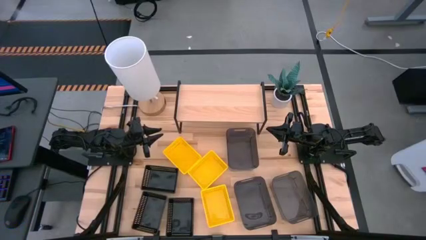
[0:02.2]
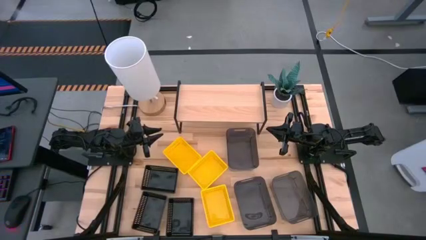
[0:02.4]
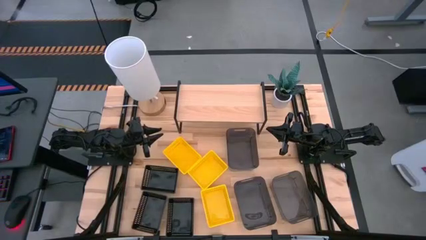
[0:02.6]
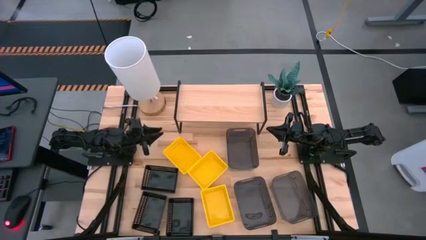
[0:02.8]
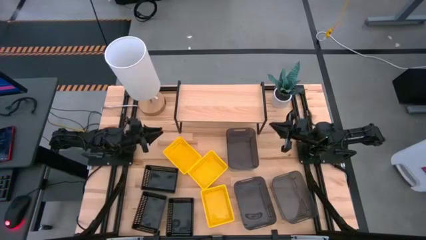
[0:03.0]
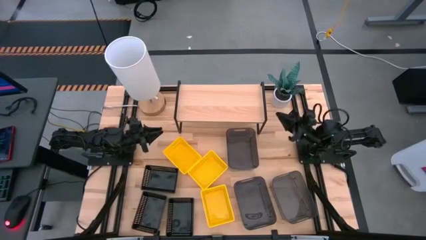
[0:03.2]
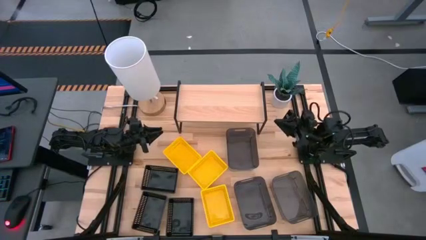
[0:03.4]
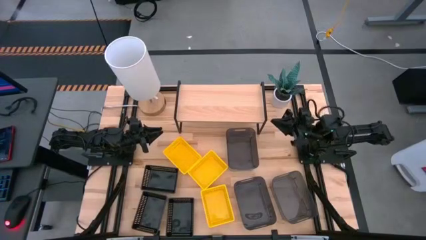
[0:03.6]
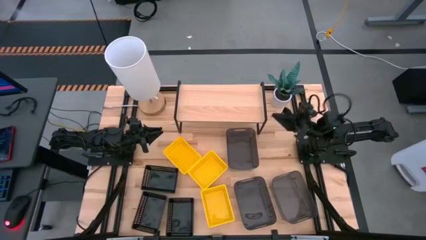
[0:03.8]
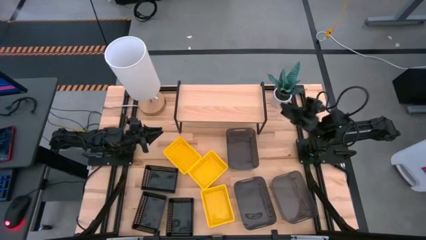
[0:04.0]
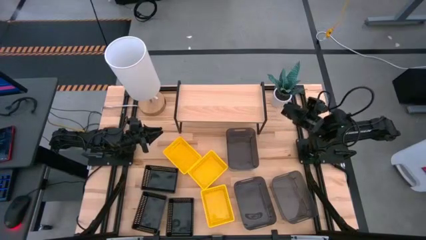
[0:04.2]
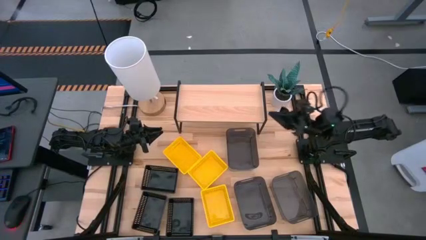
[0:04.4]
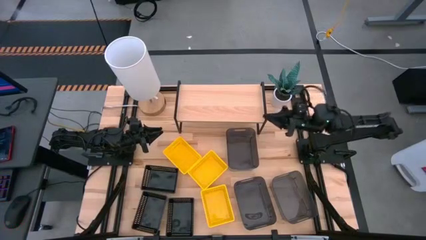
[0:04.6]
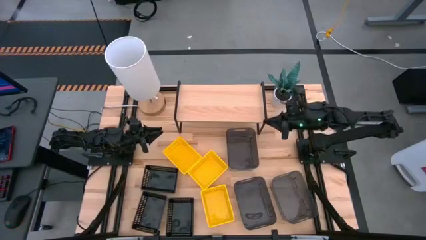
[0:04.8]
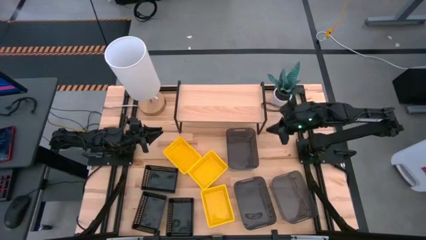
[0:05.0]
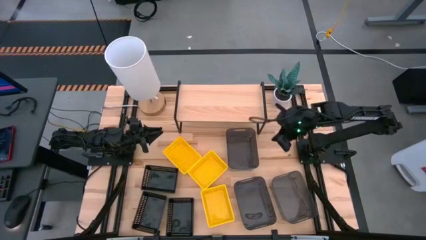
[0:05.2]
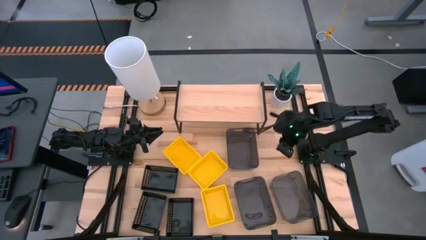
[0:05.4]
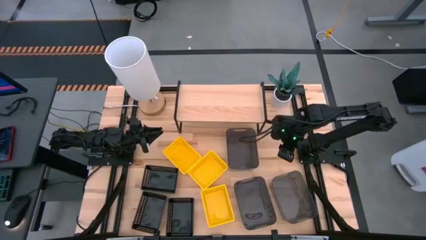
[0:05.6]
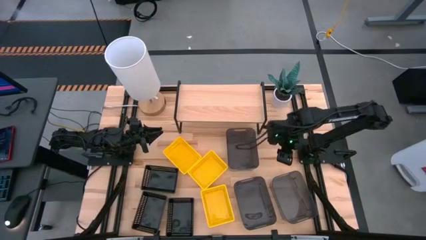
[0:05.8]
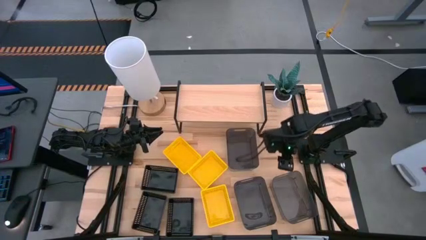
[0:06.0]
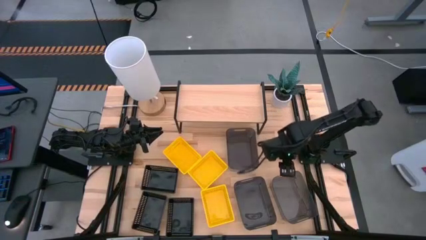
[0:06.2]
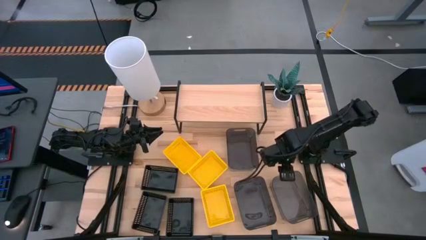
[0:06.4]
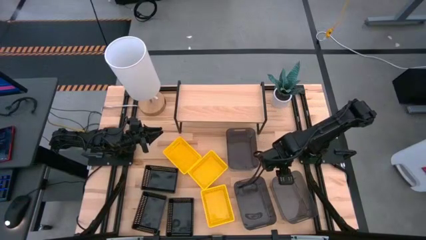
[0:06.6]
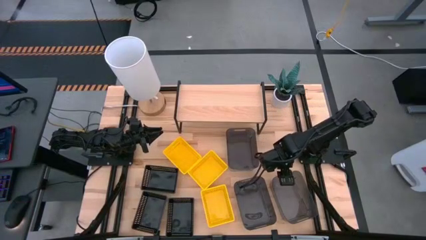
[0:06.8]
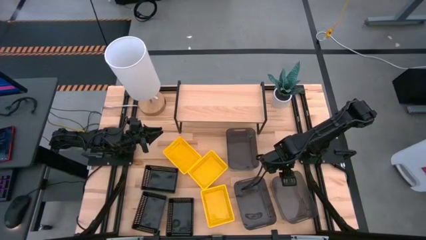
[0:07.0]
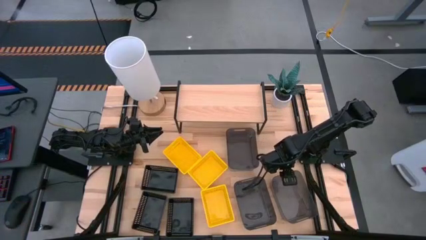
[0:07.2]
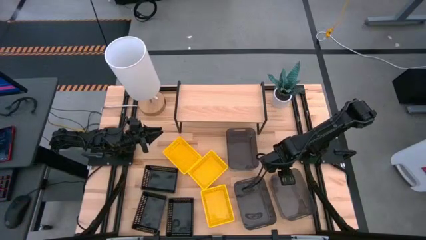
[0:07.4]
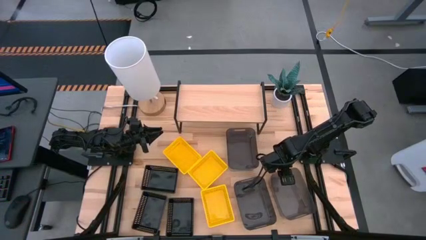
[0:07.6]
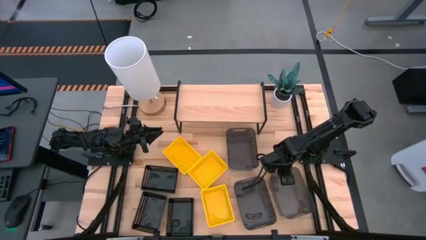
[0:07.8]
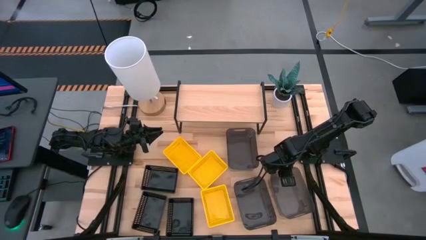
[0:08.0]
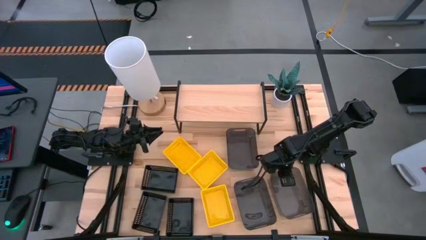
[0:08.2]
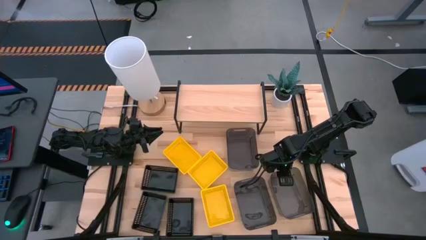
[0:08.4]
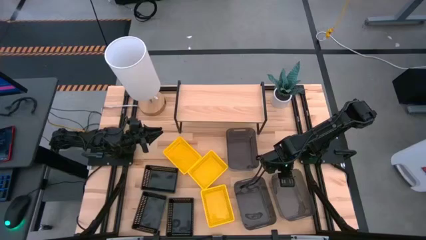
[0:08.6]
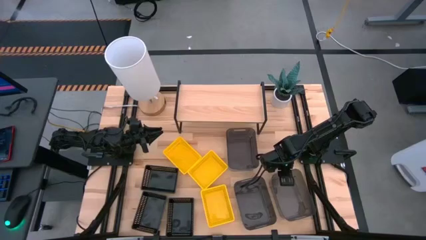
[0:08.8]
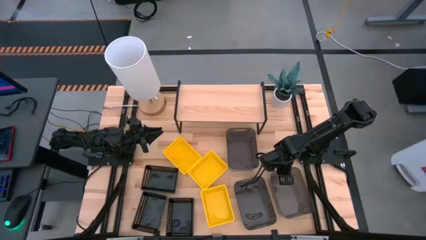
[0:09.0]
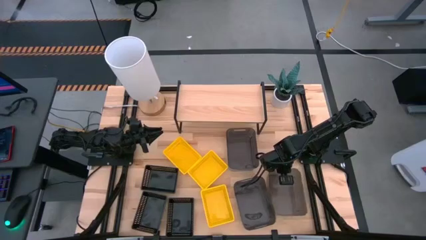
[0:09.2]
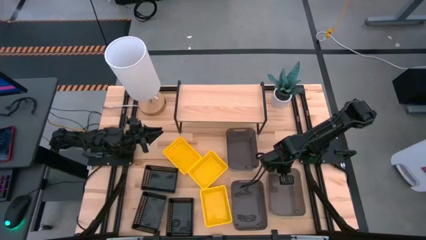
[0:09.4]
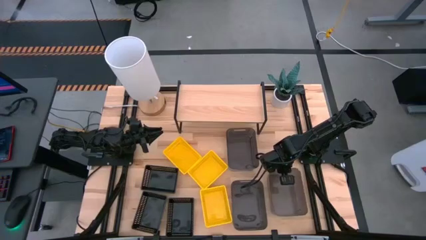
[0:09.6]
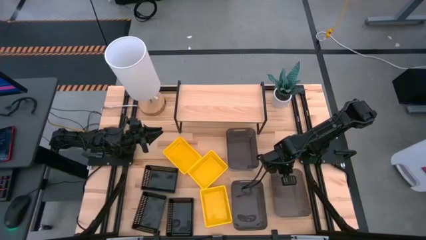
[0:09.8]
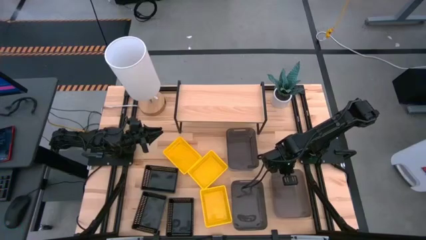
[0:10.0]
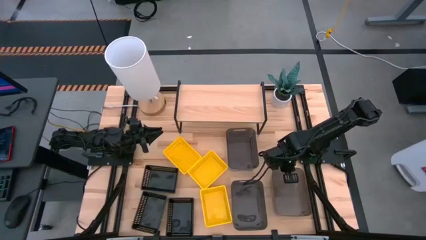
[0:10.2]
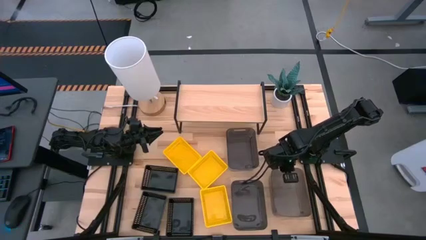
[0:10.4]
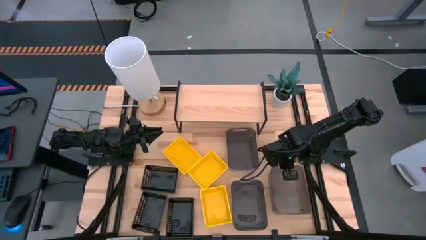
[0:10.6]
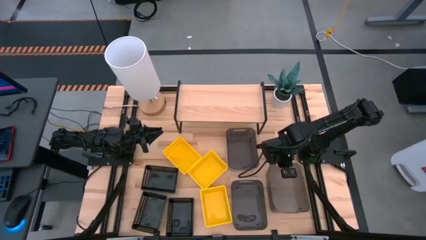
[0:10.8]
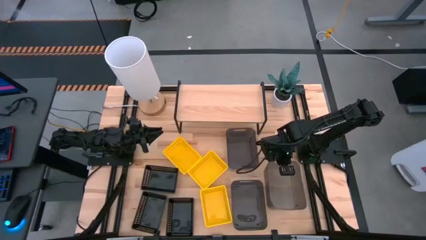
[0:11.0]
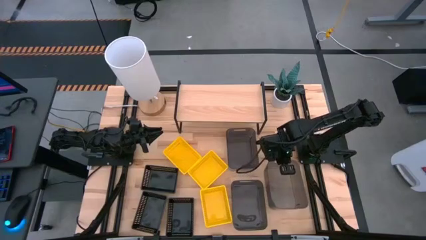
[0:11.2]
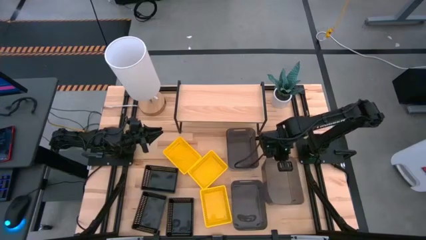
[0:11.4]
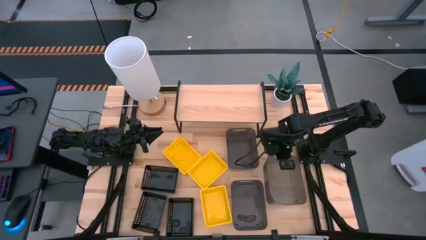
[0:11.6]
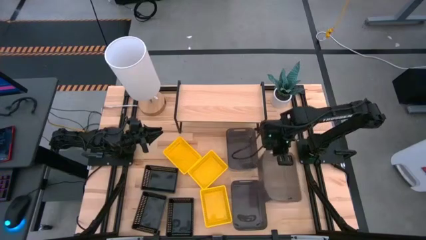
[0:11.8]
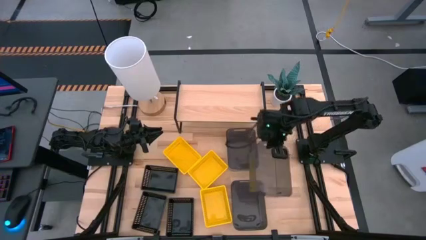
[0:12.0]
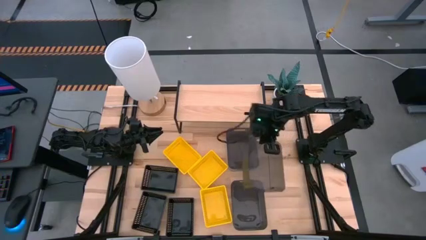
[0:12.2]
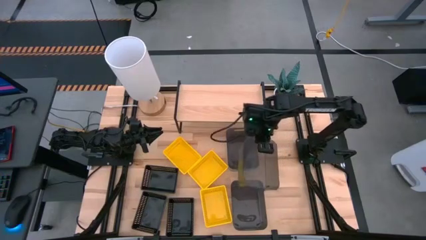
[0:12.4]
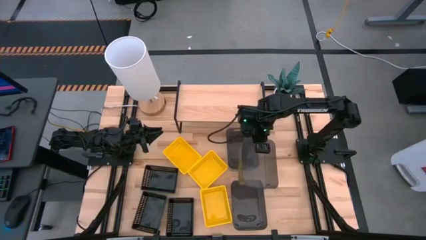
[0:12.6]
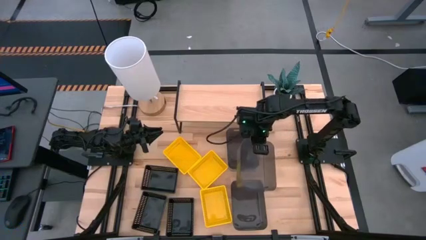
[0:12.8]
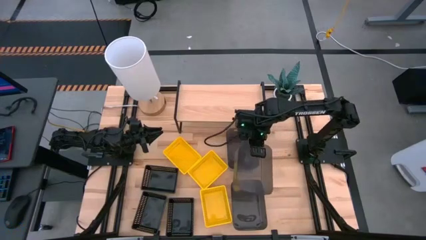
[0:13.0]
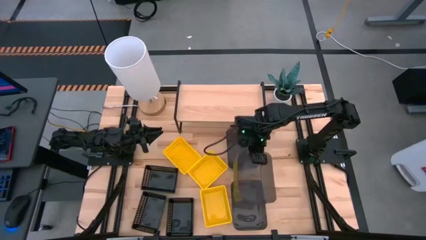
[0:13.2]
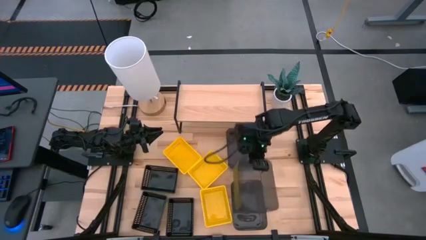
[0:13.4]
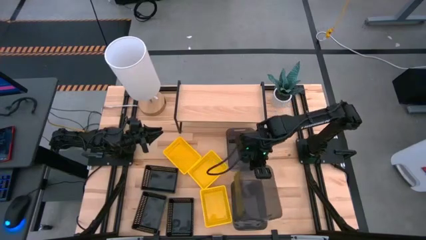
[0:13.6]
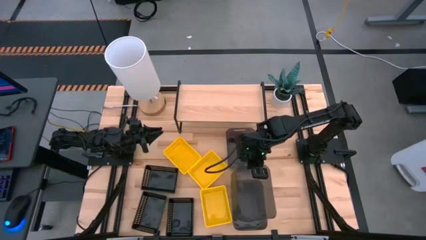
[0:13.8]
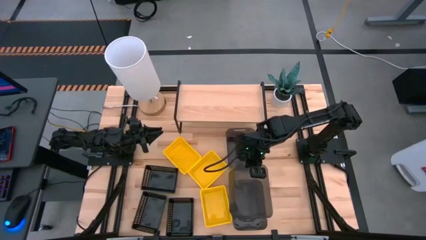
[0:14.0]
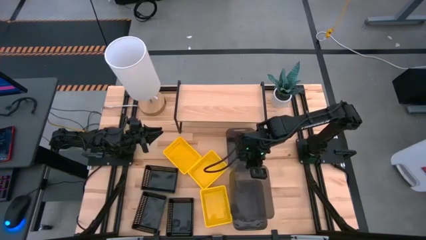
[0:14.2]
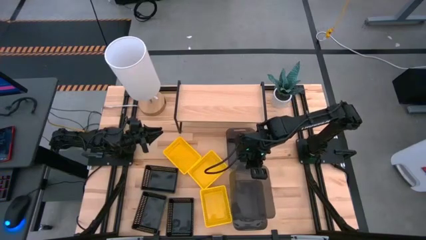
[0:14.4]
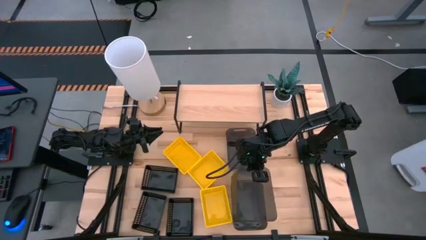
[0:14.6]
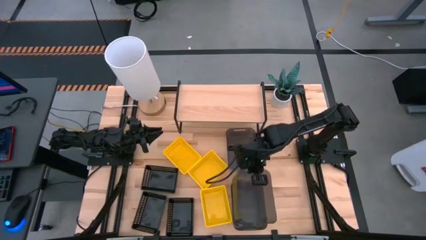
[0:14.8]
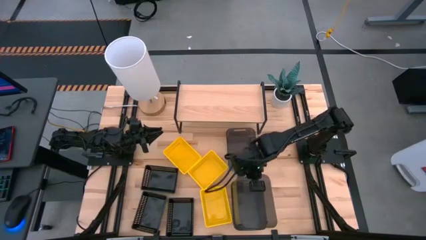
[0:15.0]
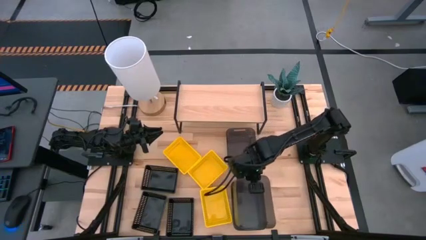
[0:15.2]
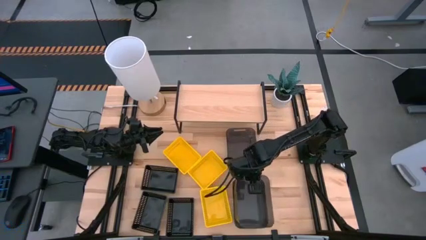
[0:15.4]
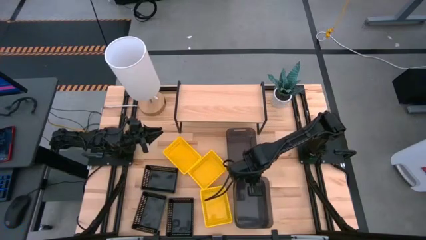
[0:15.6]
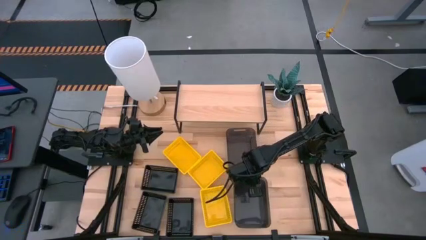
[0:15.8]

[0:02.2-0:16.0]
Task: Stack baskets on shelf by color
Stack the bottom right transparent black bin on top of the bottom left black bin
